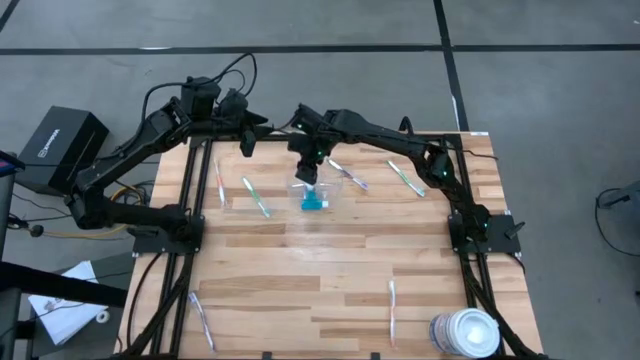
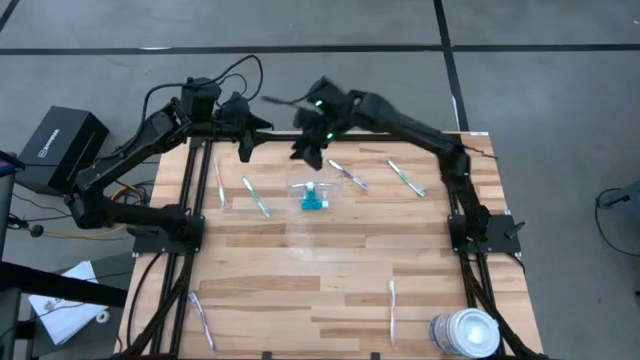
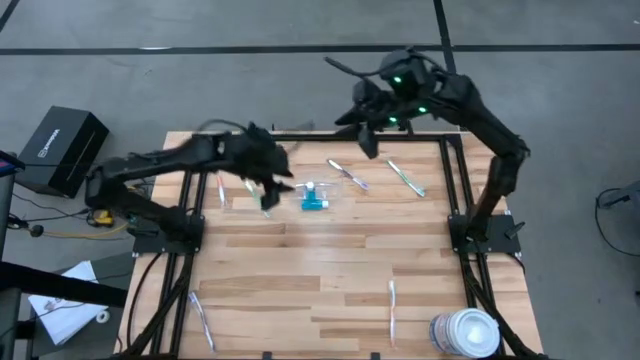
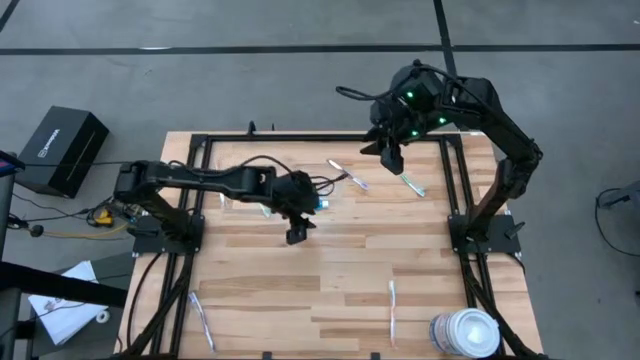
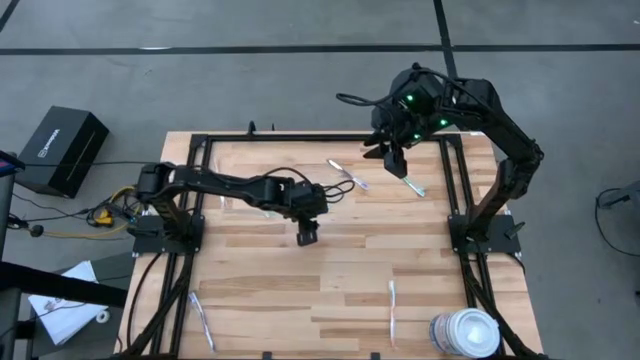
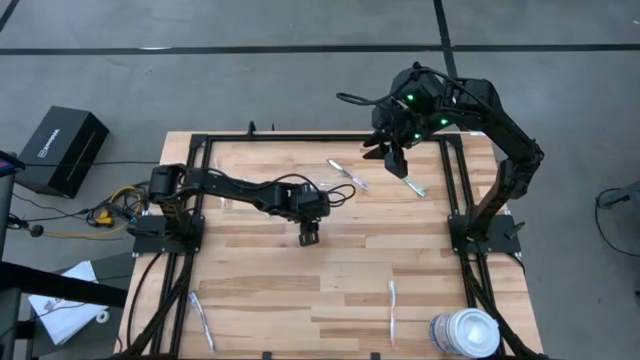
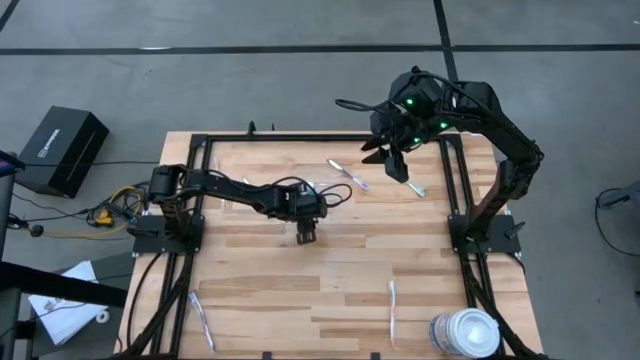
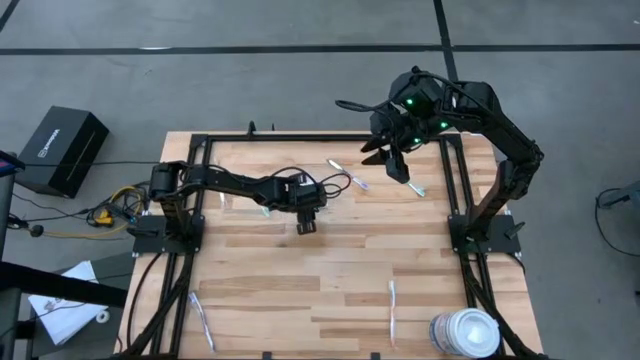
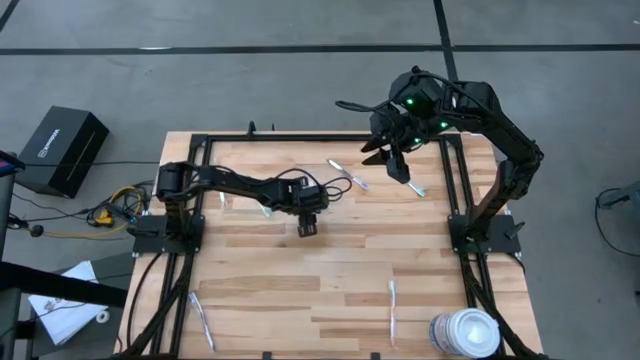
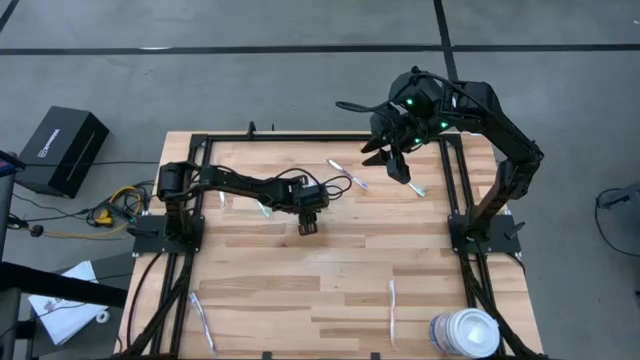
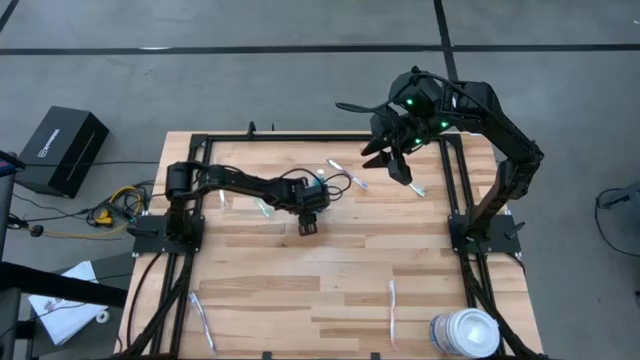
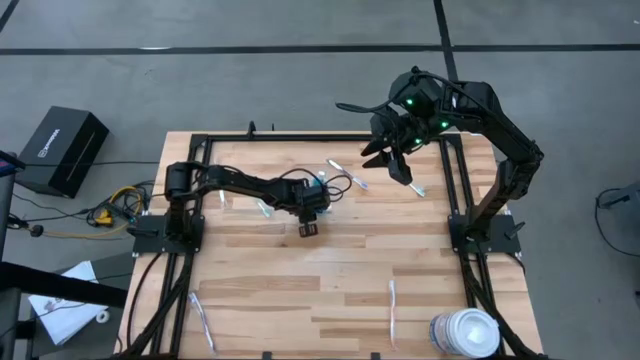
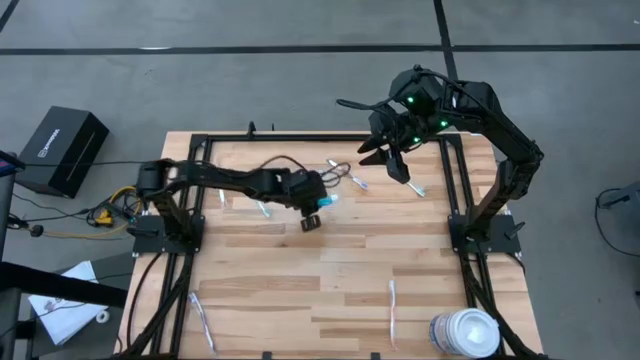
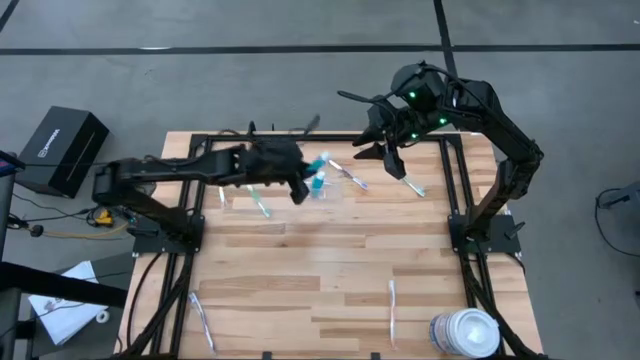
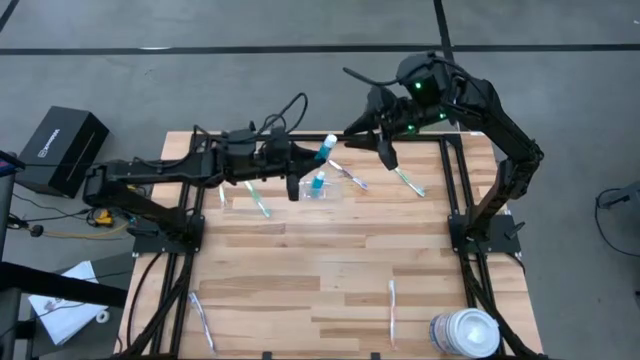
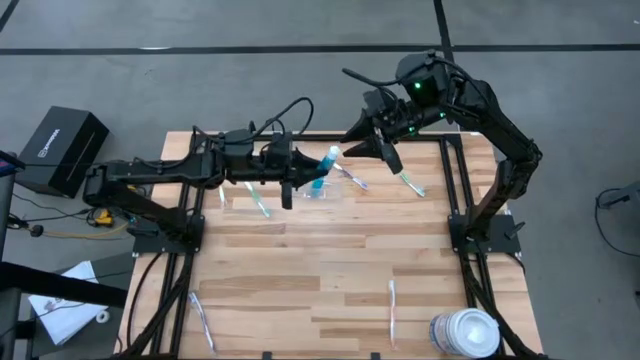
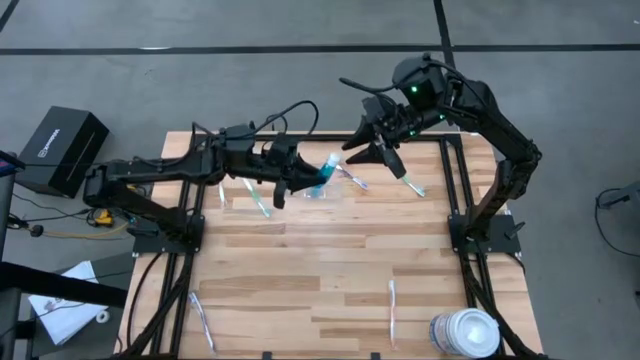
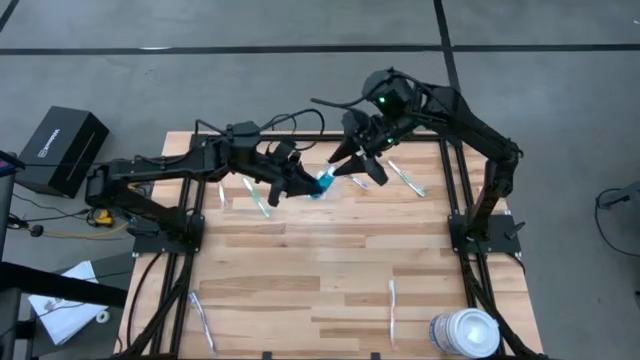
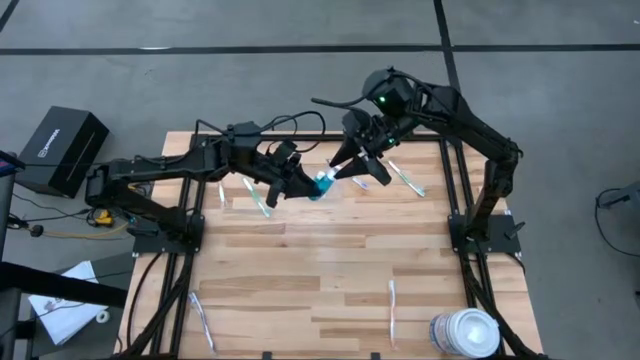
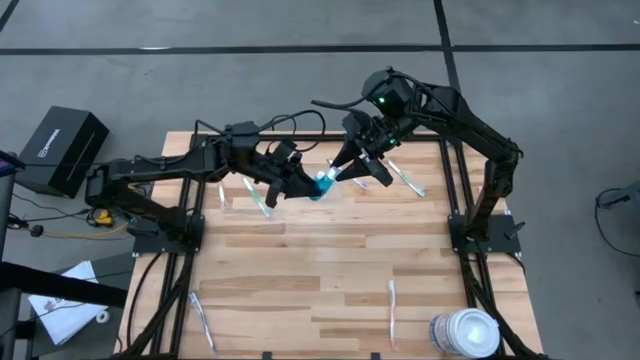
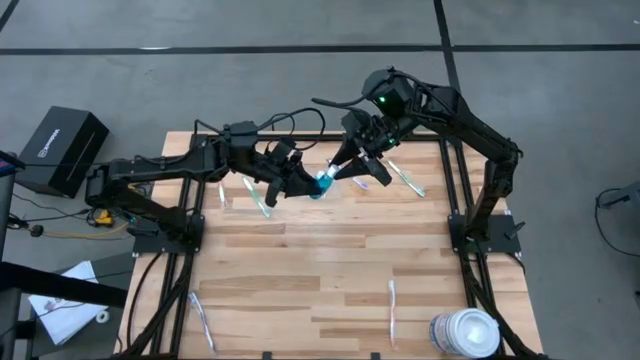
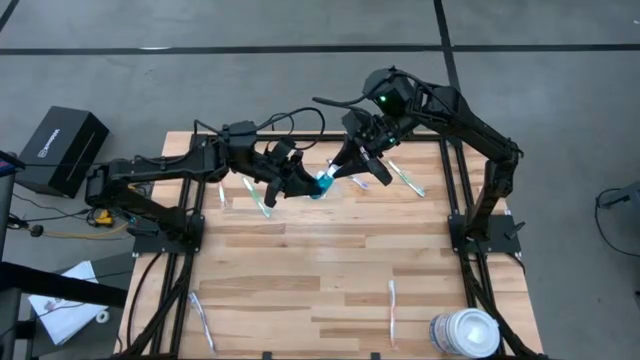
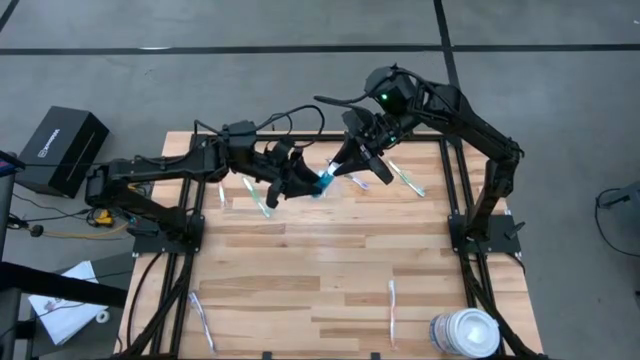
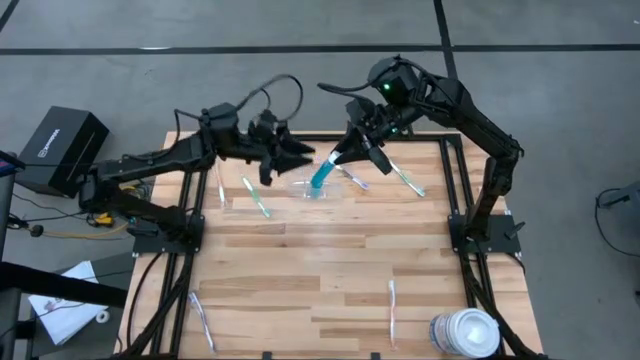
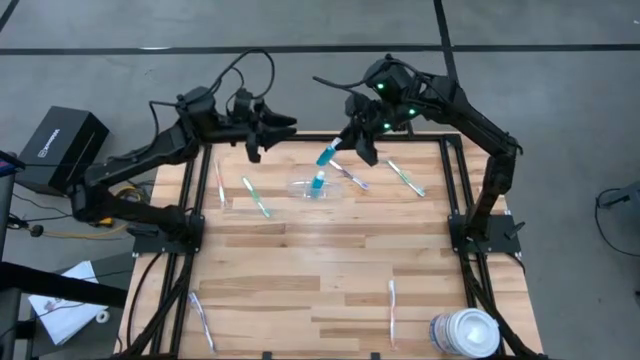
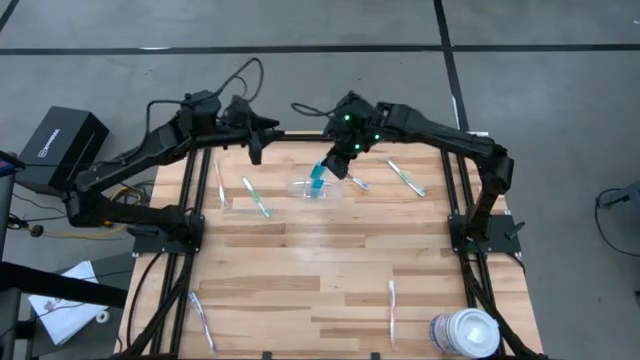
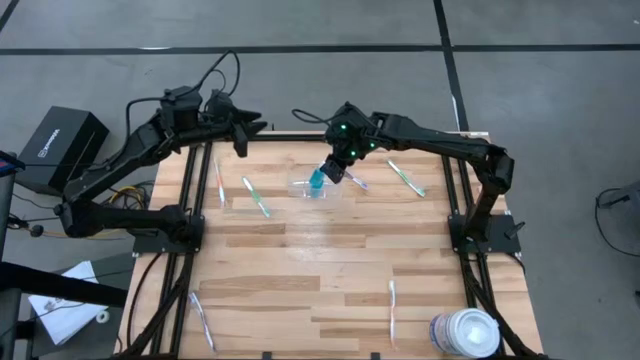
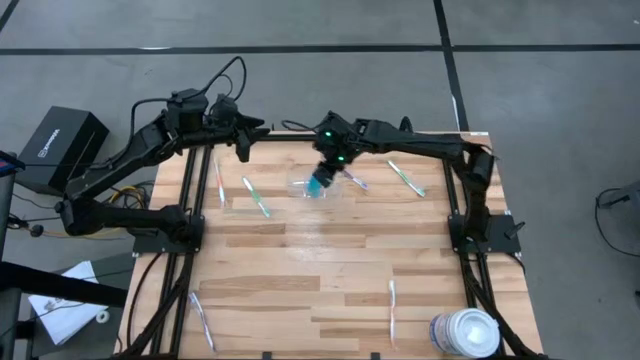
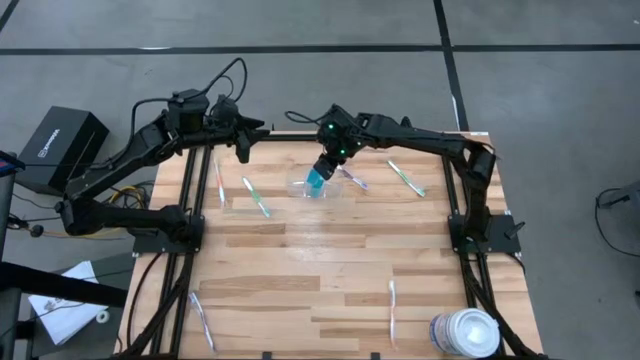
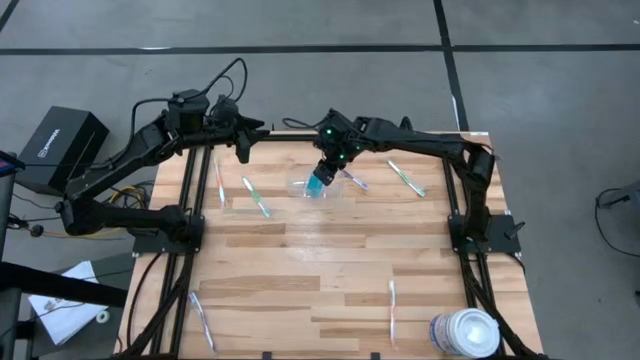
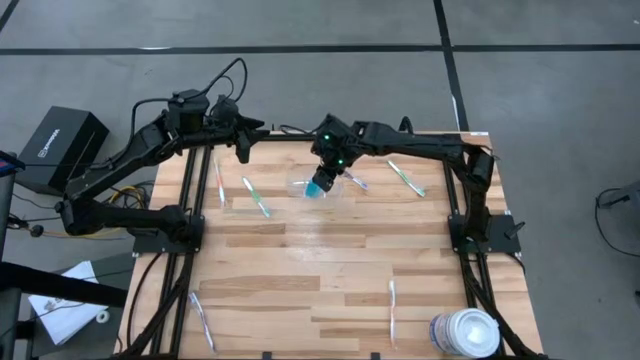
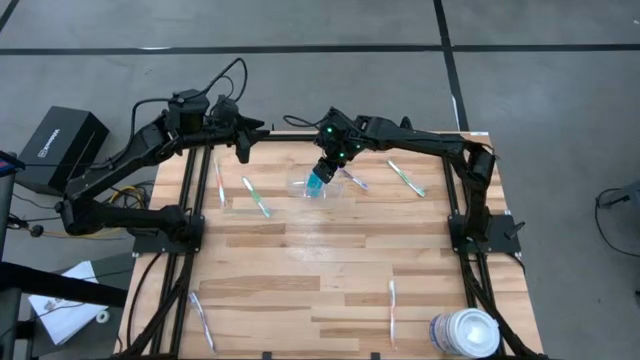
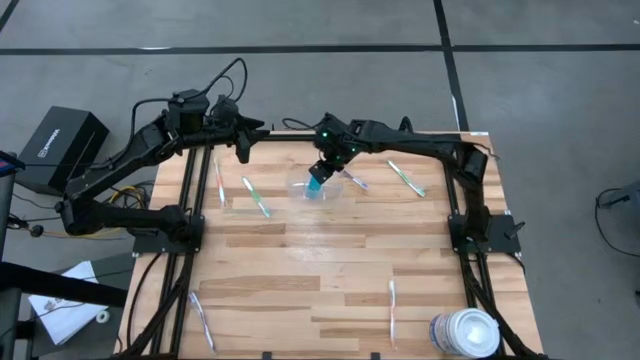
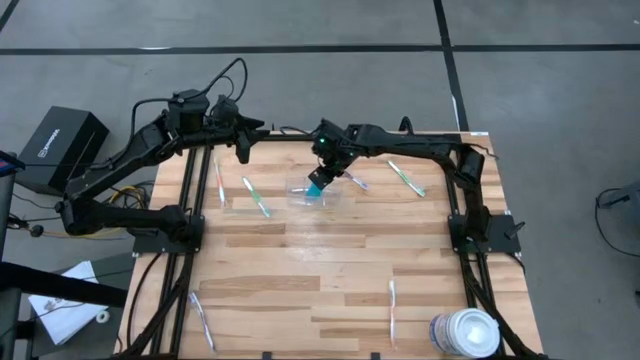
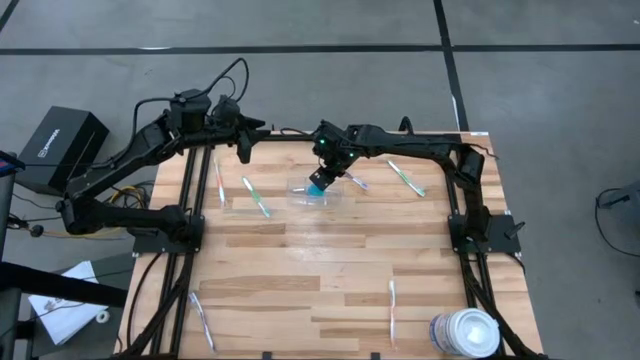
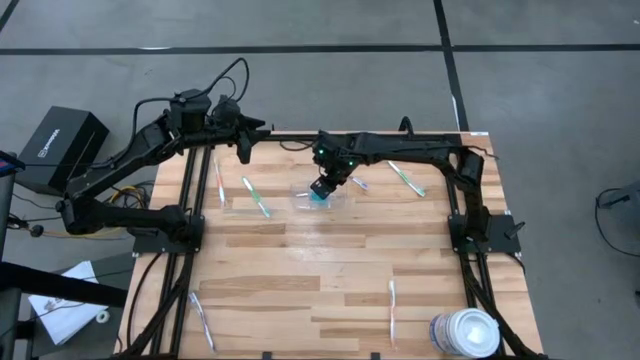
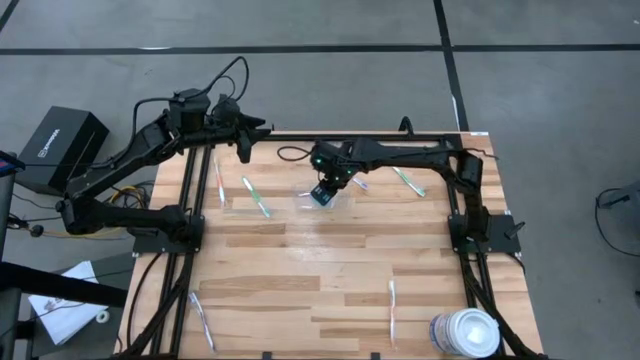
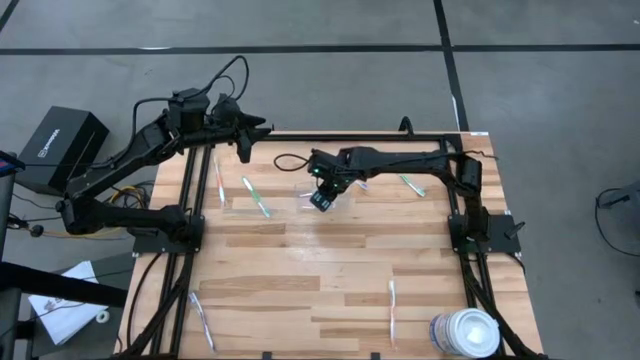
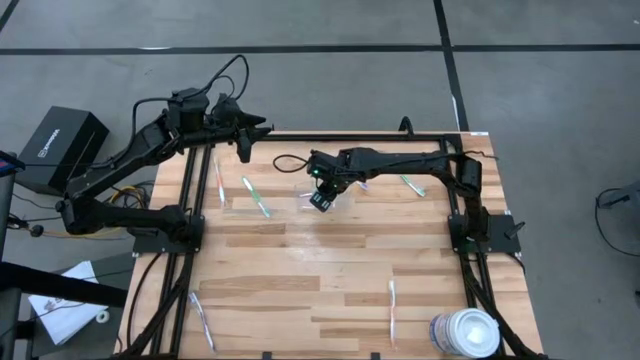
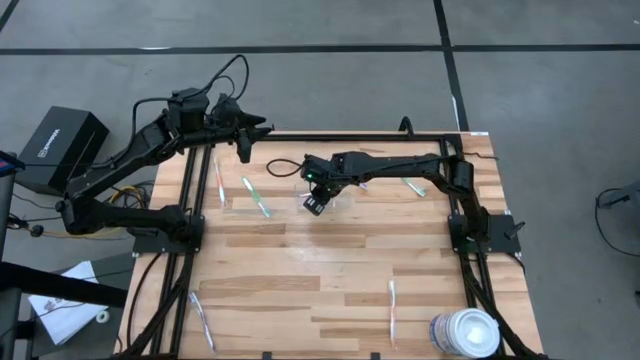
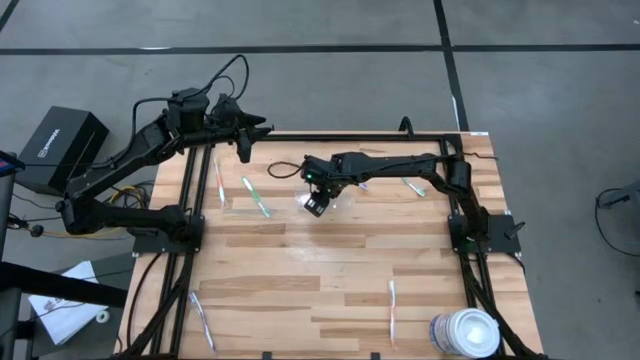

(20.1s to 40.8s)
Task: Pick & Place toothbrushing station
Put the blue mouthwash into the transparent organizer
